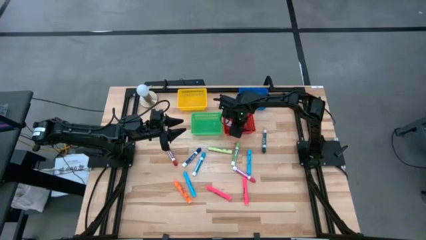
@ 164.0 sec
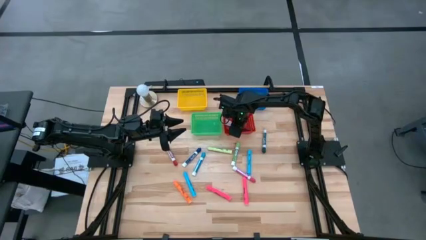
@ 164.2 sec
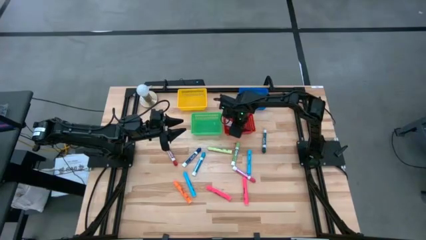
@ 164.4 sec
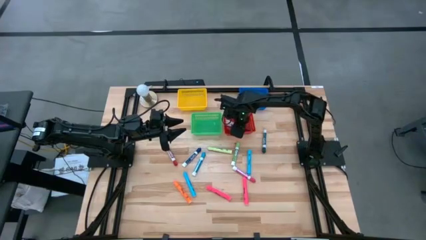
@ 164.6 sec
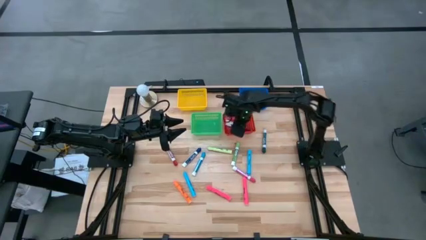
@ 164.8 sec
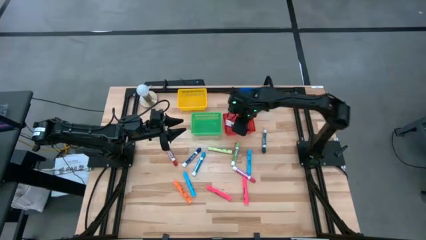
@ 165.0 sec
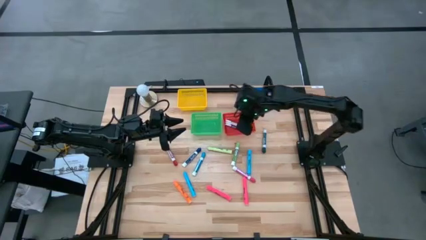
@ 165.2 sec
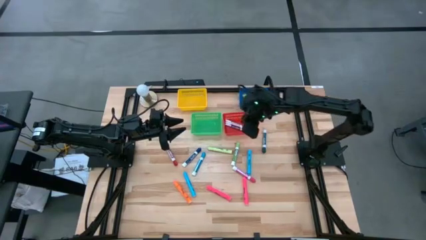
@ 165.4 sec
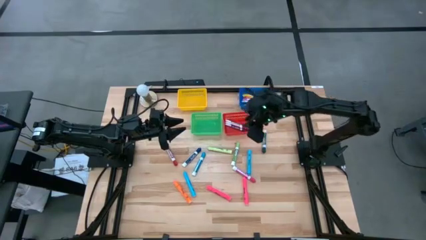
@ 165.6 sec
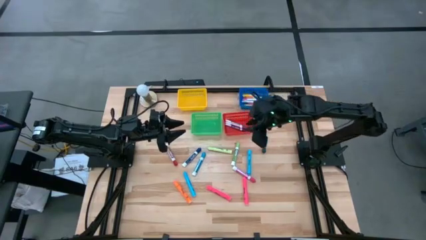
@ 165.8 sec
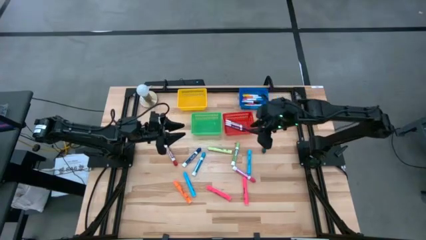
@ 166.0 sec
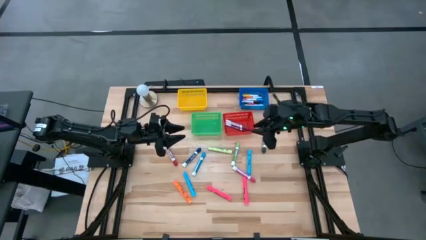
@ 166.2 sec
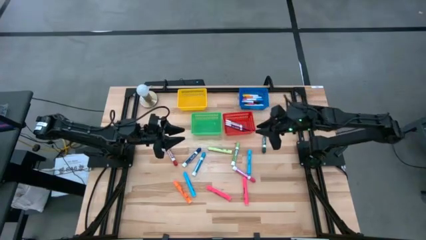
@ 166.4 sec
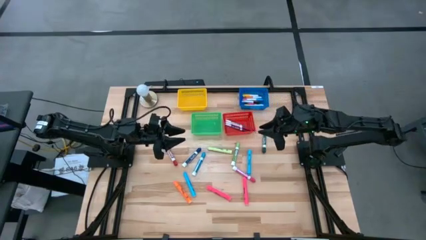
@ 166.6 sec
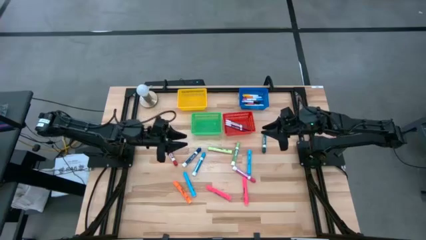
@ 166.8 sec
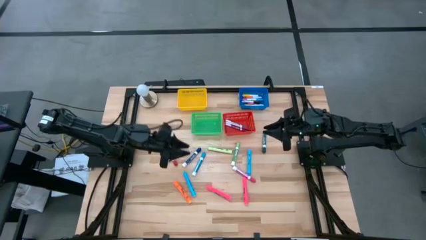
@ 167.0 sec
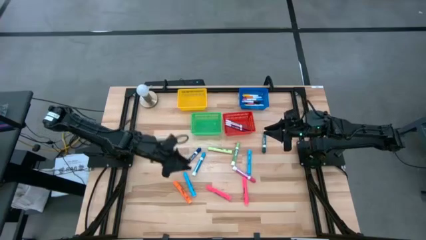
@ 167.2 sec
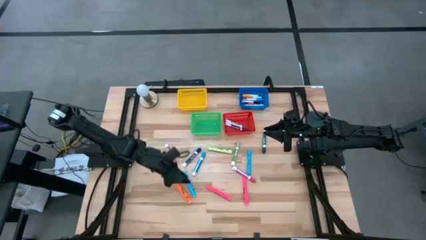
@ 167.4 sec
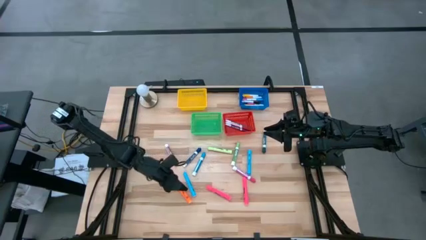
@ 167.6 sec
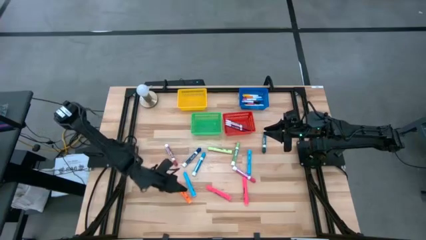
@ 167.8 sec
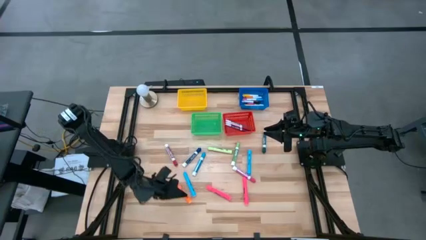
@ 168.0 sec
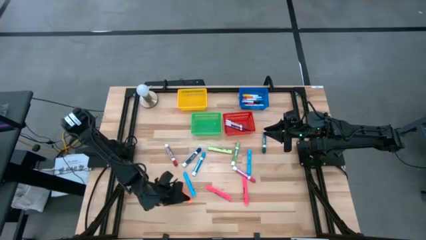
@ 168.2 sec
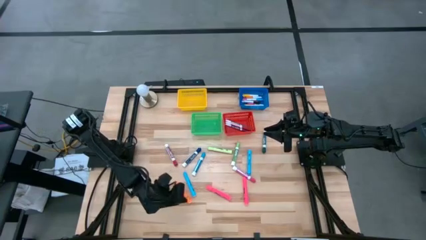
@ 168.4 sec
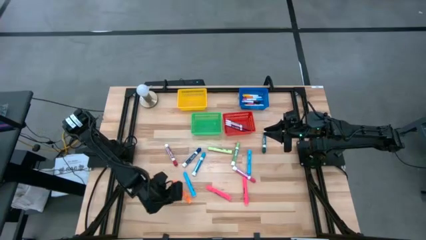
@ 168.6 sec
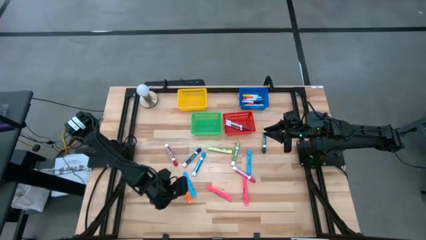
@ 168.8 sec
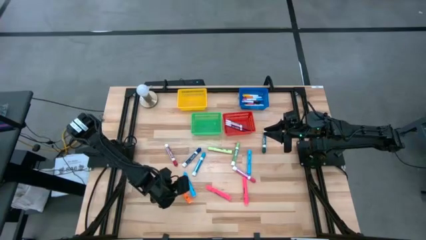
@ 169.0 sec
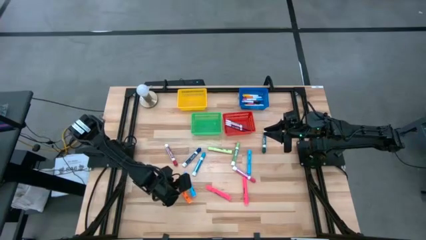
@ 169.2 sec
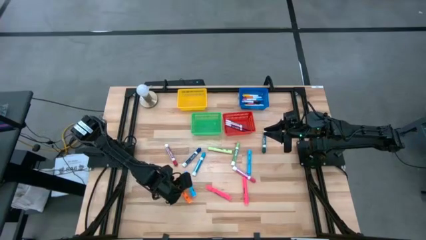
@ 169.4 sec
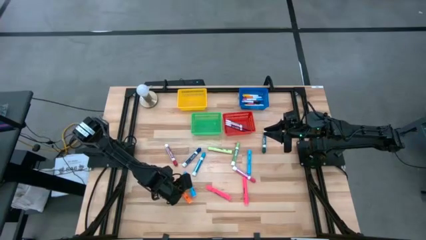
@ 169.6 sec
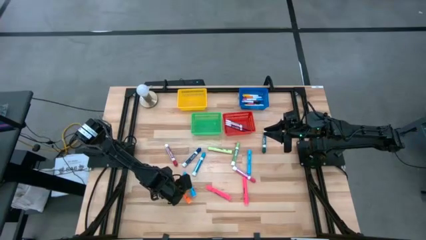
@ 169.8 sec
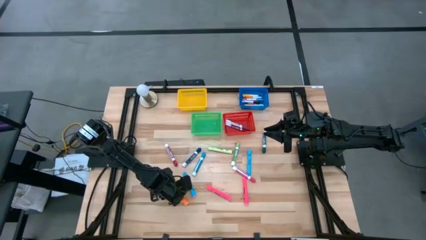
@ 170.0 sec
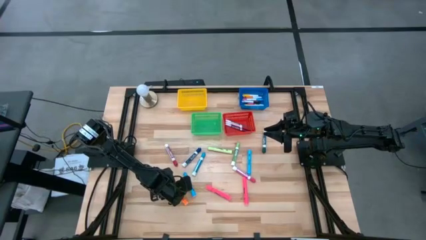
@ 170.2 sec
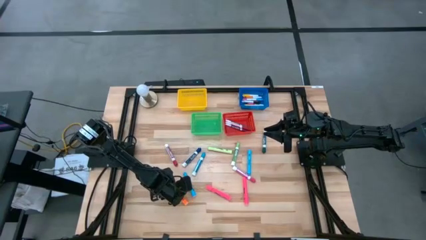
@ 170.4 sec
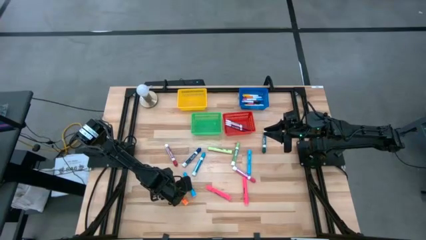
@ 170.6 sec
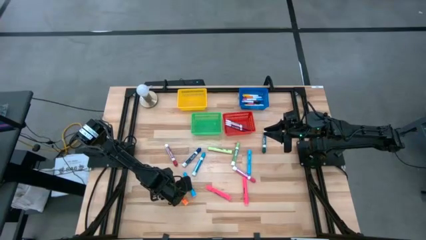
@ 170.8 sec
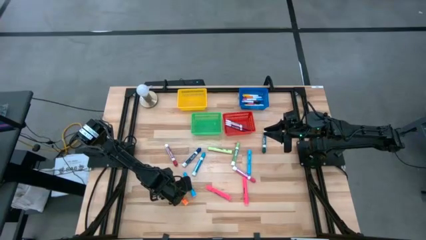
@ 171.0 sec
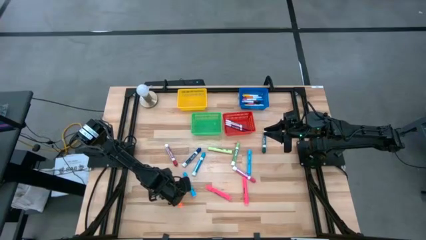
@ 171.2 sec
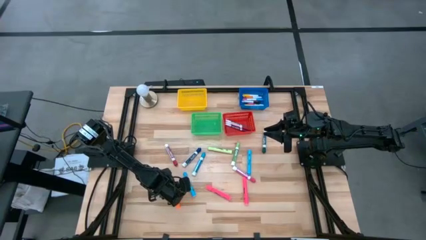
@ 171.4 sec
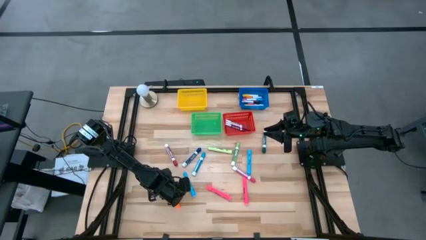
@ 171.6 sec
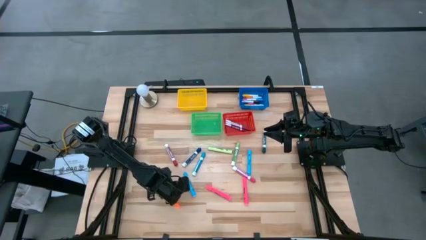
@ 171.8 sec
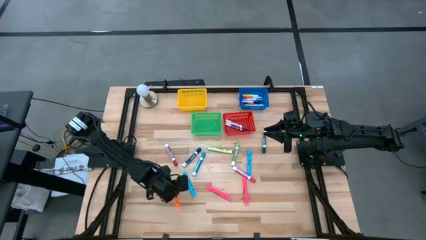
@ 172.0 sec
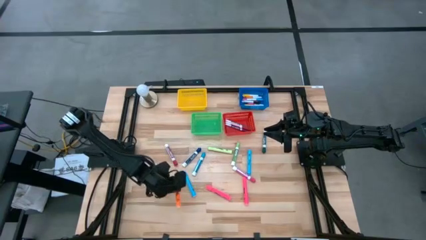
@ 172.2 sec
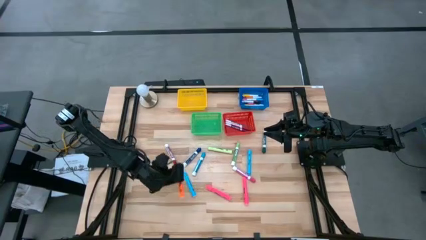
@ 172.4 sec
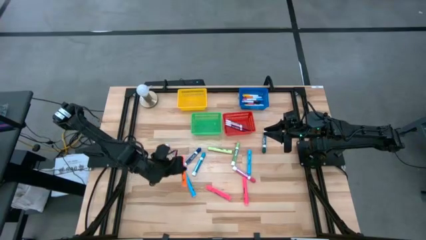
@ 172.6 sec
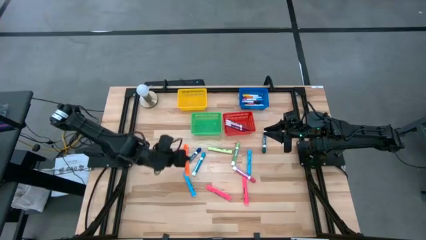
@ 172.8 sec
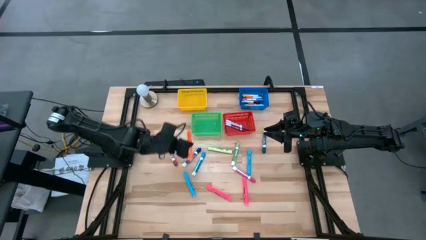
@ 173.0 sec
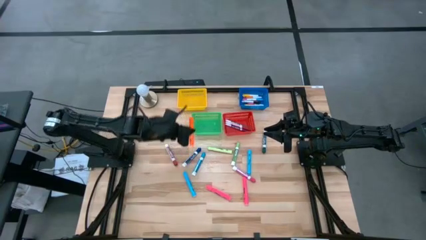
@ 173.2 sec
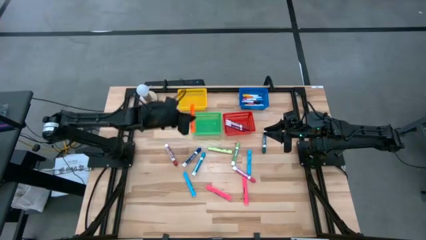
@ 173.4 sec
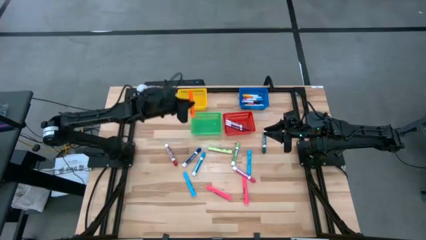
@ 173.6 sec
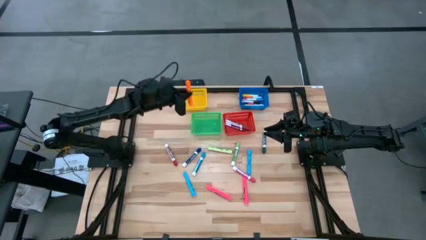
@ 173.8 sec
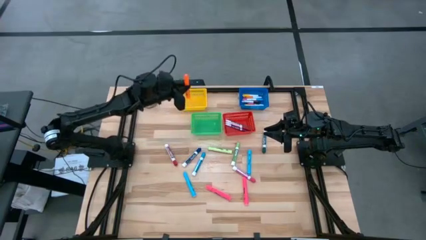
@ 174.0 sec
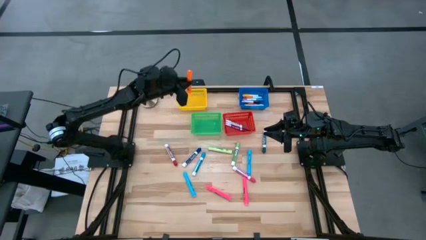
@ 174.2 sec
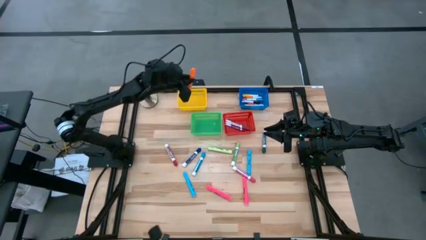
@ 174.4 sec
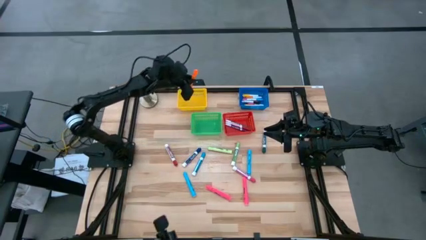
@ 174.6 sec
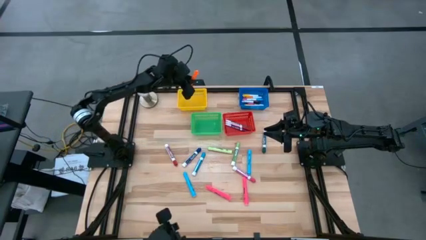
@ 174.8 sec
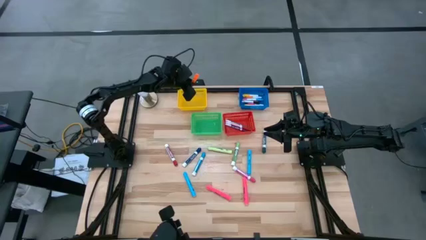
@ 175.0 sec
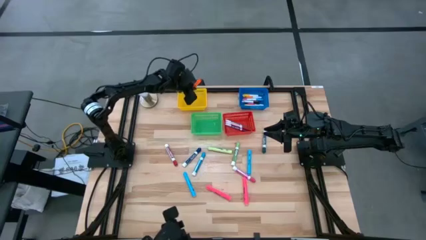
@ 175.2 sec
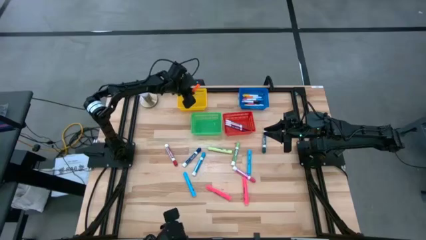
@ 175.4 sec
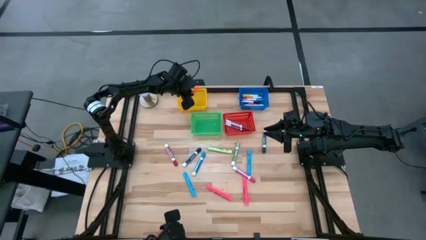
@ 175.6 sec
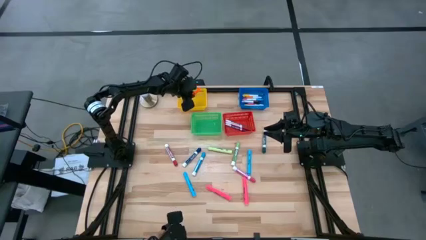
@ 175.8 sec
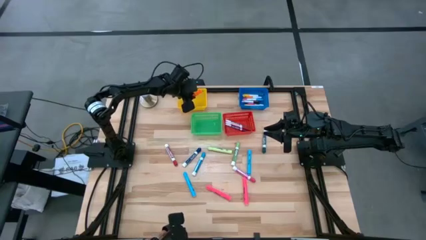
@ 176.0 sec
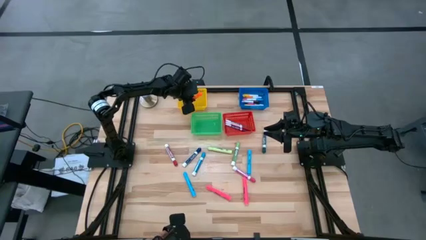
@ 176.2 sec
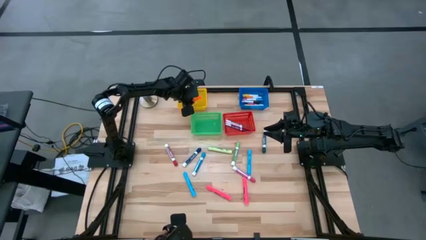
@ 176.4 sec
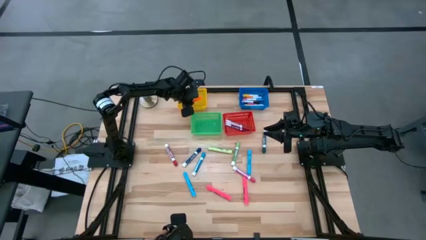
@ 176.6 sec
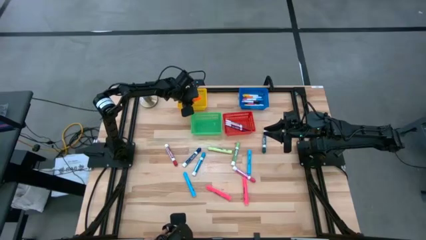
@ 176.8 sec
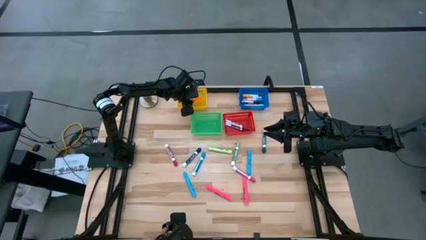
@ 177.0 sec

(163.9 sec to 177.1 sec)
Task: Pick & Place Markers
Put the orange sharpie into the yellow bin

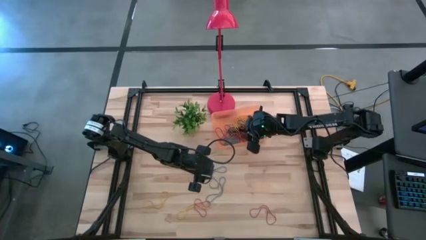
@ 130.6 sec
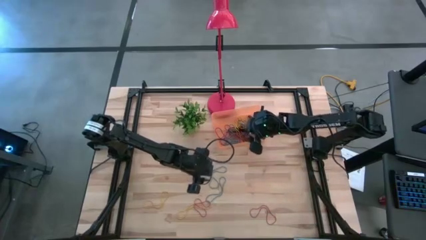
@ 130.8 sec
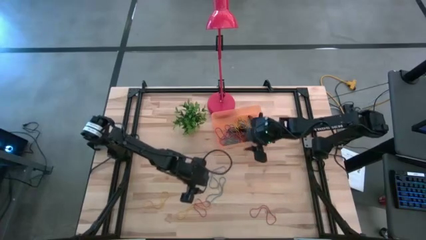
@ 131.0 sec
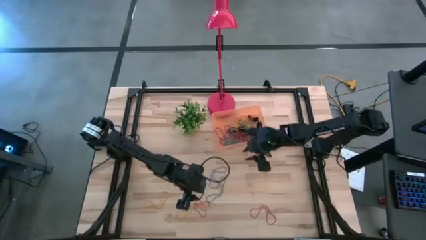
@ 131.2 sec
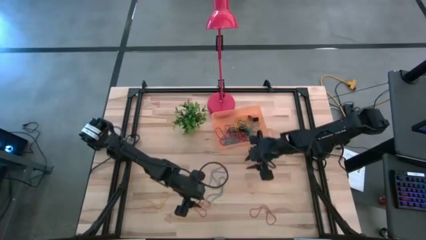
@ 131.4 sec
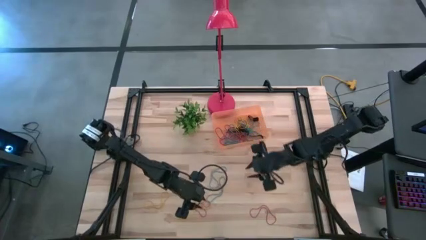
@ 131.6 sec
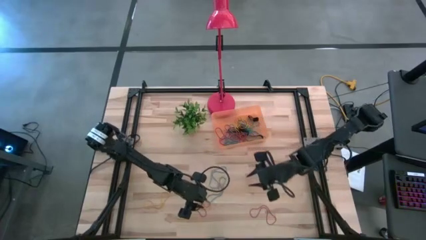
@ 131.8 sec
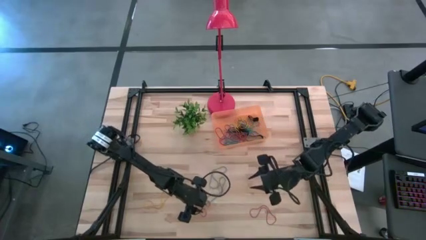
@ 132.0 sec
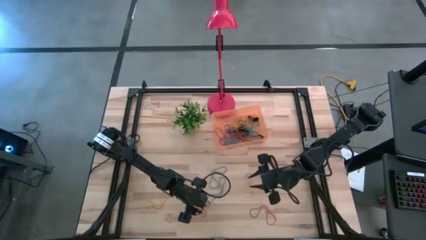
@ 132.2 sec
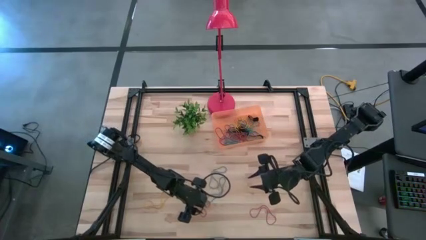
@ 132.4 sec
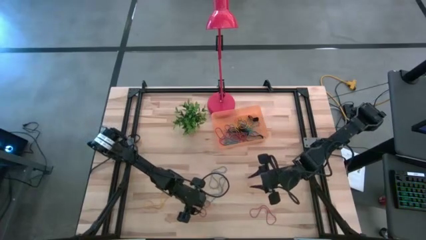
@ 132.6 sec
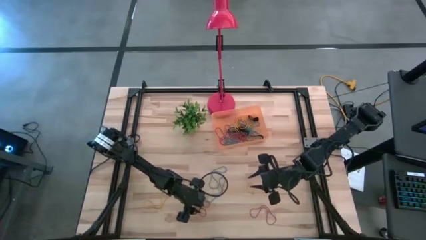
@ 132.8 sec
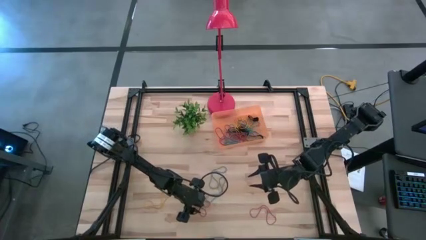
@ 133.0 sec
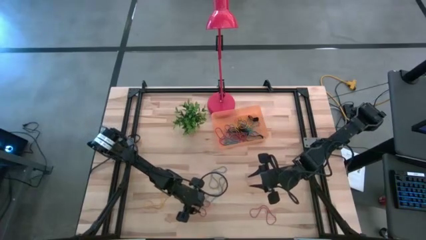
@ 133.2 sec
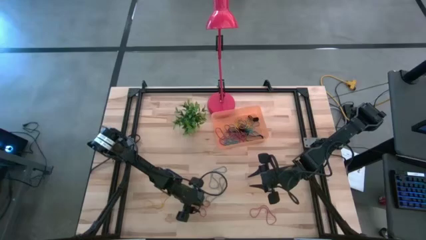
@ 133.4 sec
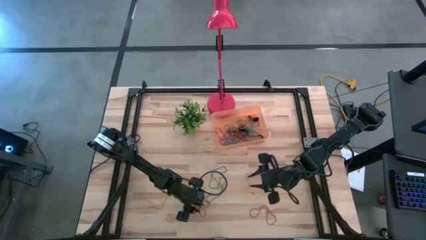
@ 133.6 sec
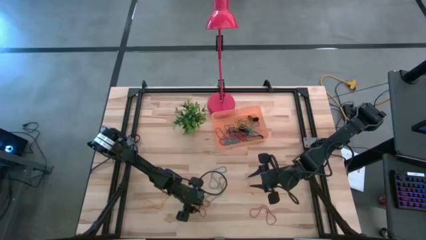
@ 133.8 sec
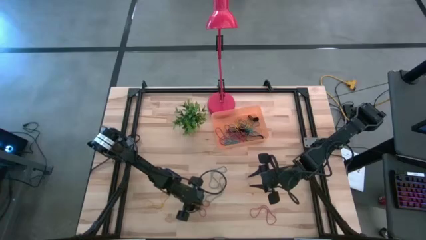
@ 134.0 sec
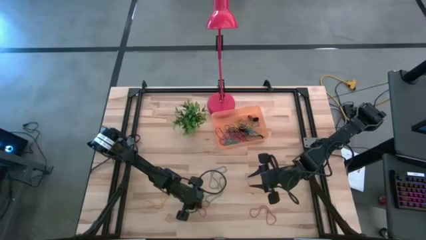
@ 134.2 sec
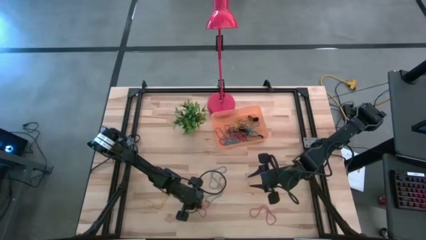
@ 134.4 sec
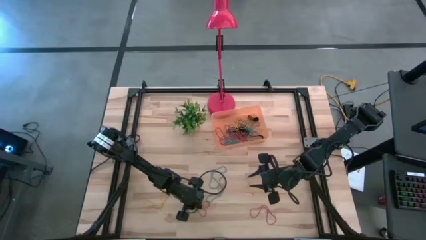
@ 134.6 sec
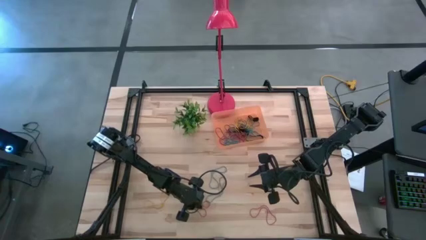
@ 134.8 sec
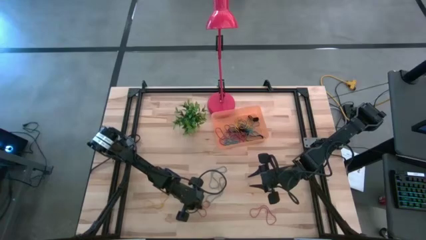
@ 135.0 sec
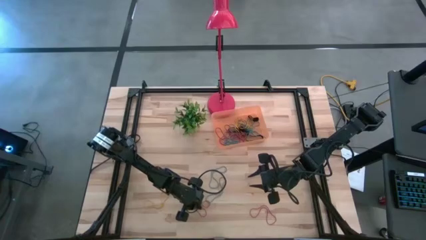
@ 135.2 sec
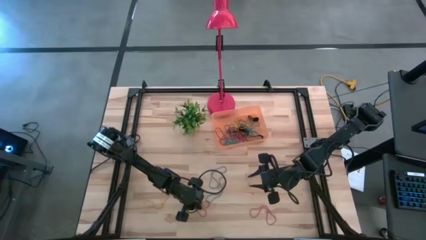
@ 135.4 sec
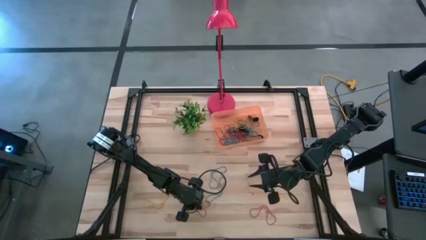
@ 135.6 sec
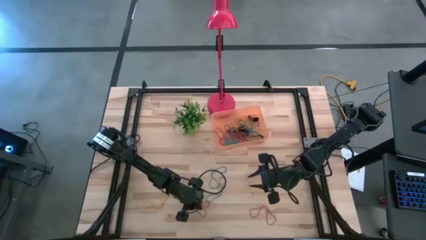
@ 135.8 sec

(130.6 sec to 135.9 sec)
Task: Pick and place rubber bands into bin
Put the red rubberband into the orange container
